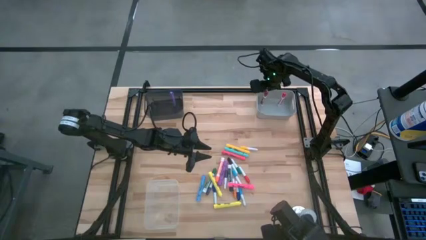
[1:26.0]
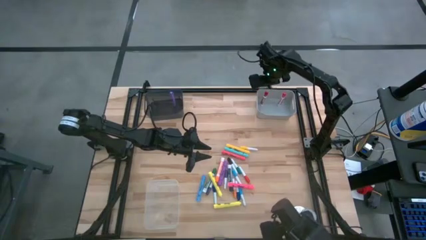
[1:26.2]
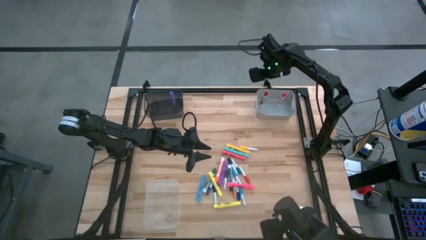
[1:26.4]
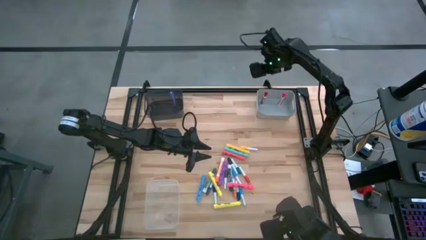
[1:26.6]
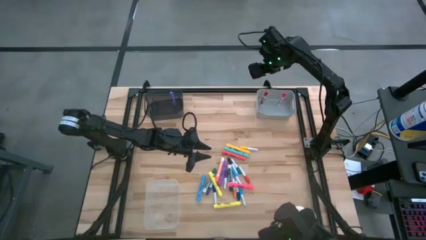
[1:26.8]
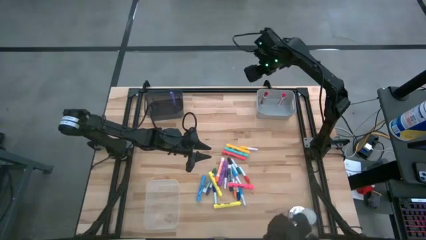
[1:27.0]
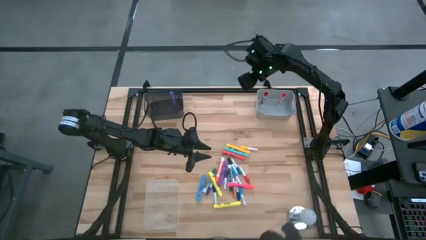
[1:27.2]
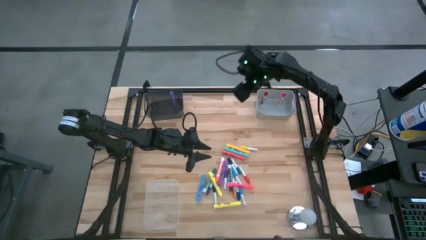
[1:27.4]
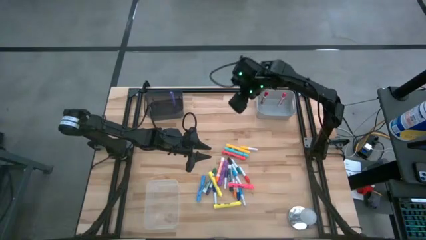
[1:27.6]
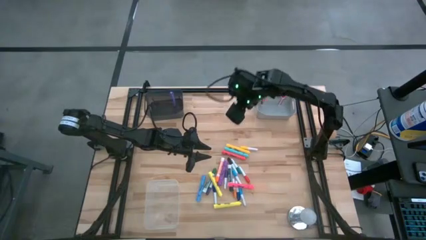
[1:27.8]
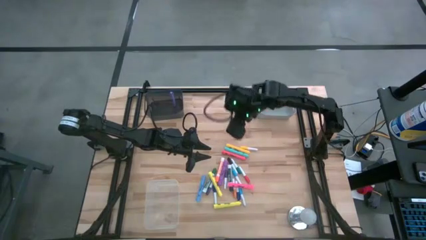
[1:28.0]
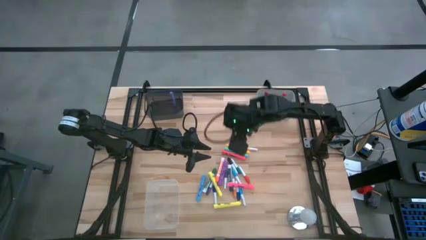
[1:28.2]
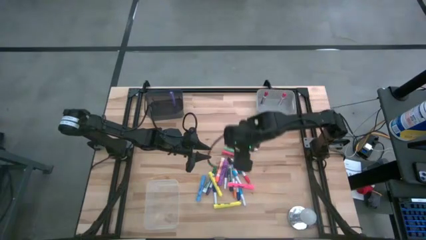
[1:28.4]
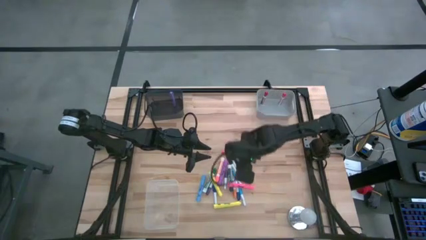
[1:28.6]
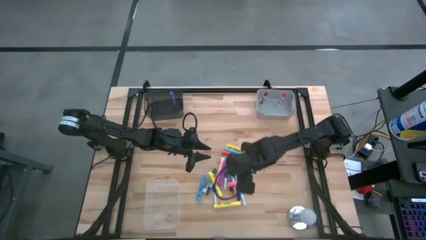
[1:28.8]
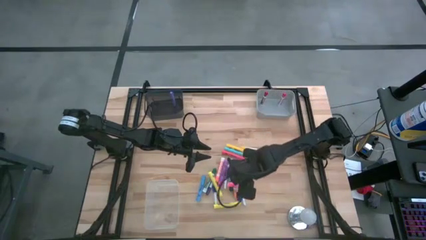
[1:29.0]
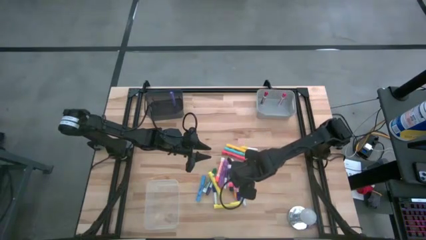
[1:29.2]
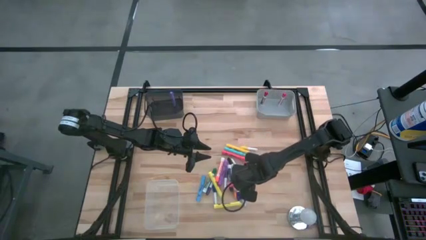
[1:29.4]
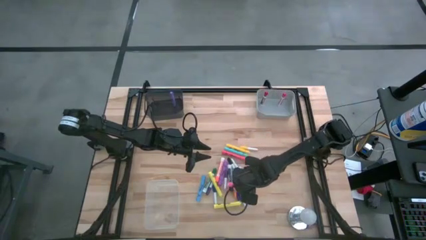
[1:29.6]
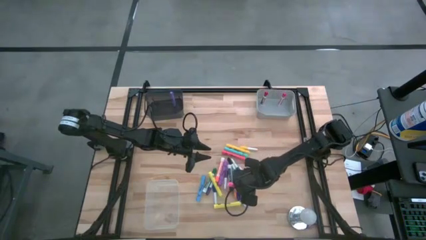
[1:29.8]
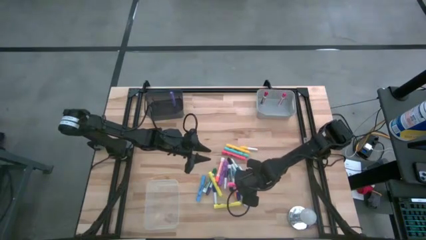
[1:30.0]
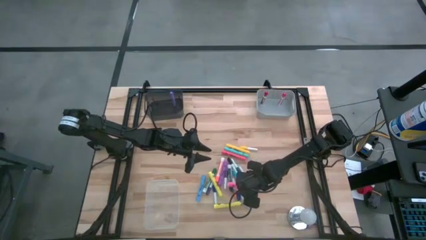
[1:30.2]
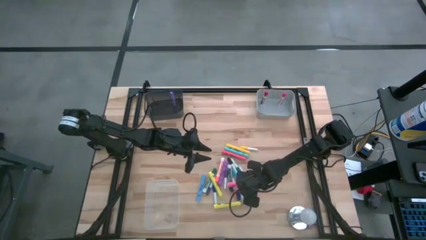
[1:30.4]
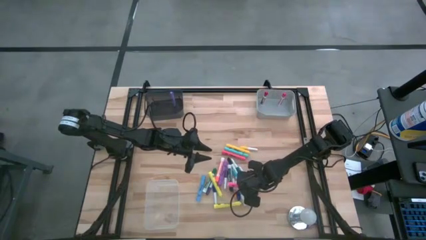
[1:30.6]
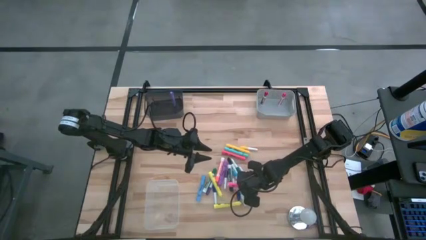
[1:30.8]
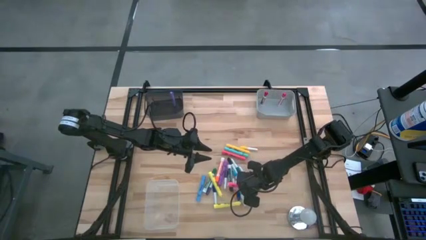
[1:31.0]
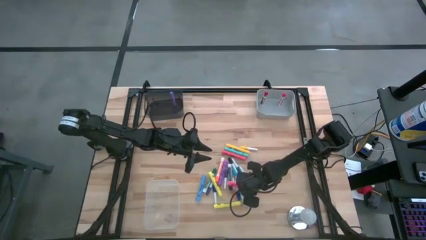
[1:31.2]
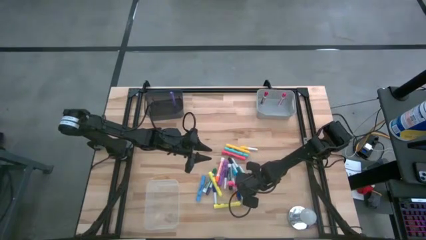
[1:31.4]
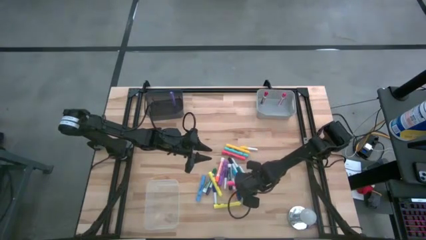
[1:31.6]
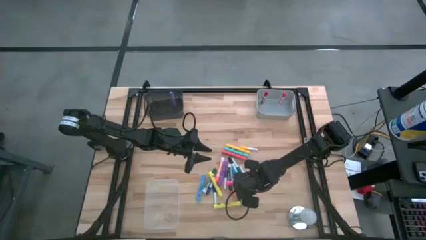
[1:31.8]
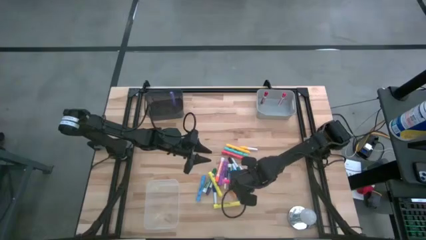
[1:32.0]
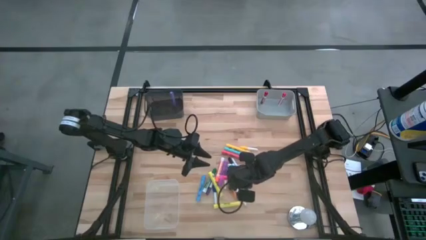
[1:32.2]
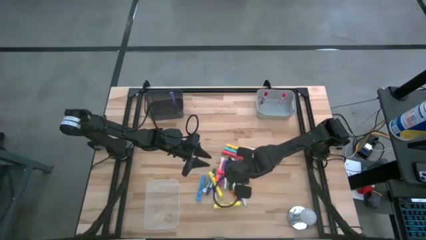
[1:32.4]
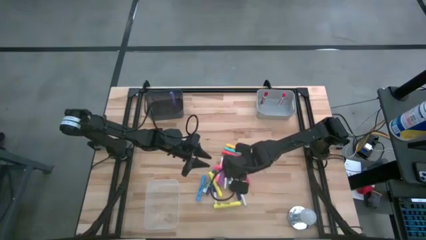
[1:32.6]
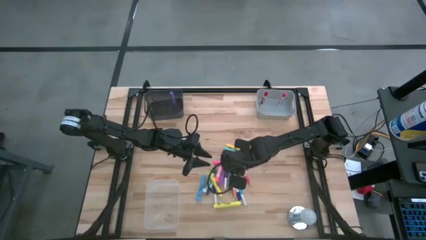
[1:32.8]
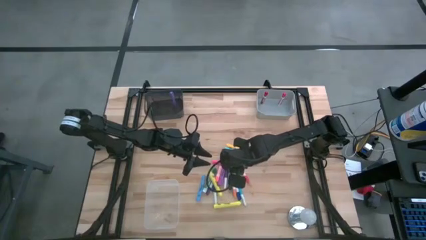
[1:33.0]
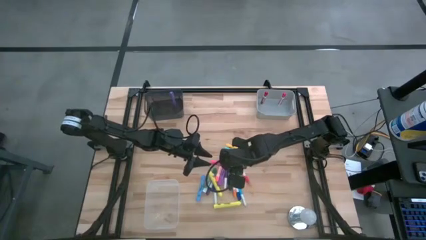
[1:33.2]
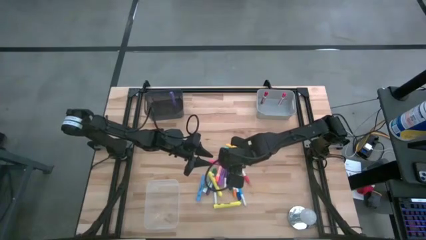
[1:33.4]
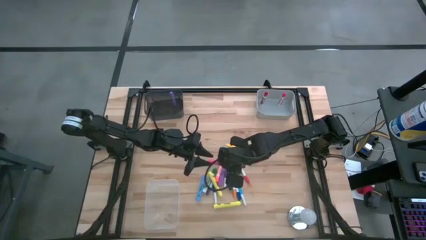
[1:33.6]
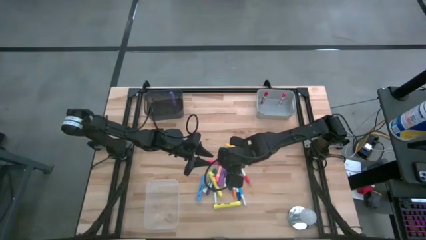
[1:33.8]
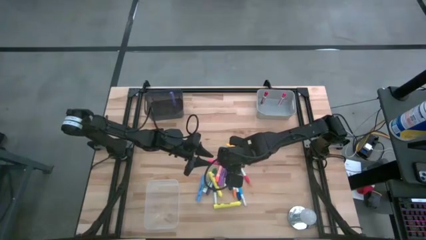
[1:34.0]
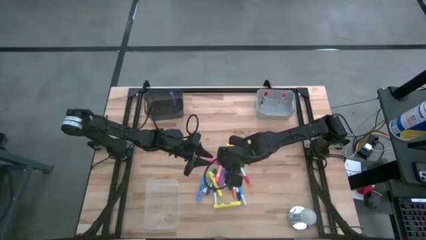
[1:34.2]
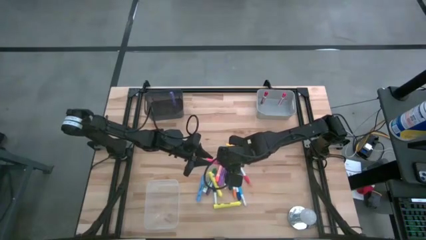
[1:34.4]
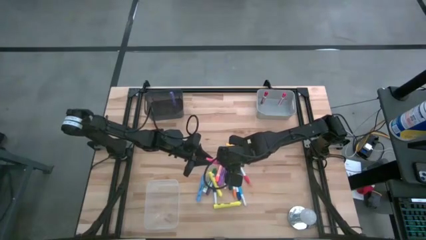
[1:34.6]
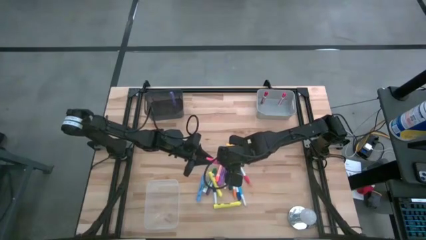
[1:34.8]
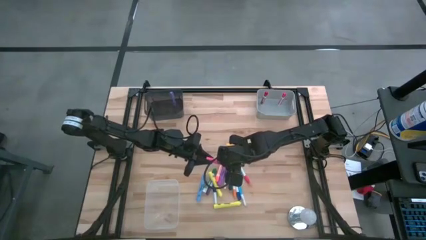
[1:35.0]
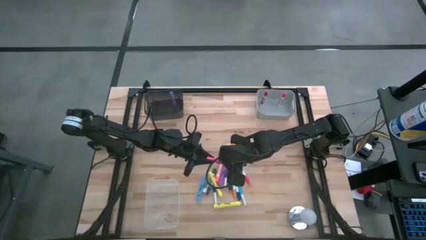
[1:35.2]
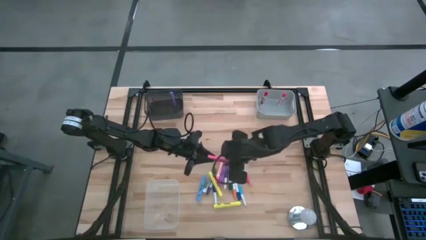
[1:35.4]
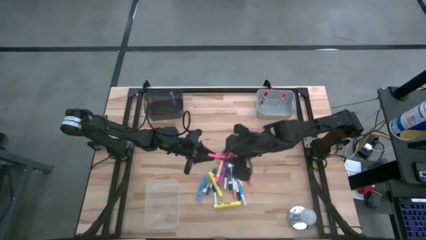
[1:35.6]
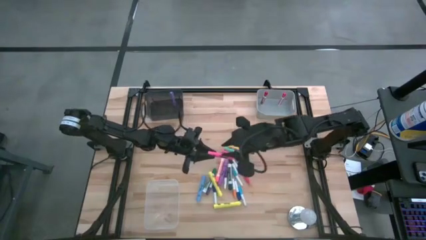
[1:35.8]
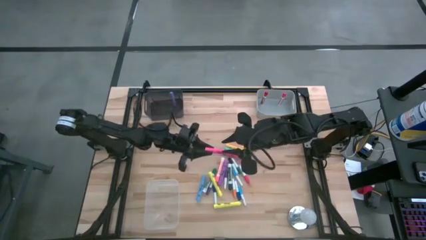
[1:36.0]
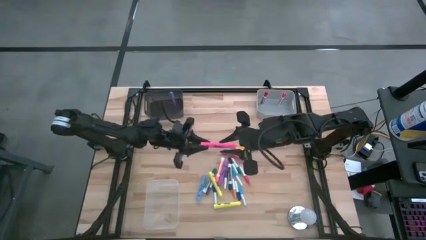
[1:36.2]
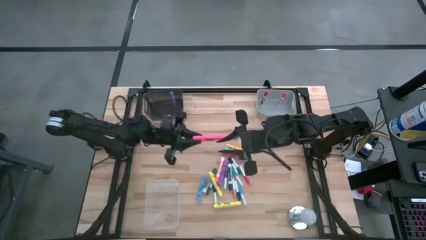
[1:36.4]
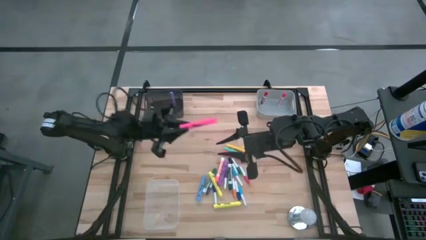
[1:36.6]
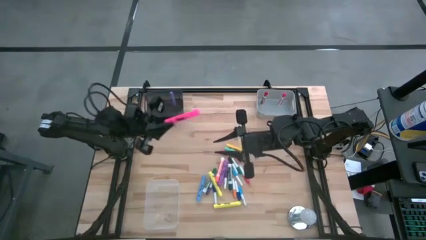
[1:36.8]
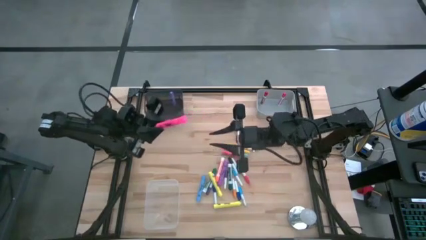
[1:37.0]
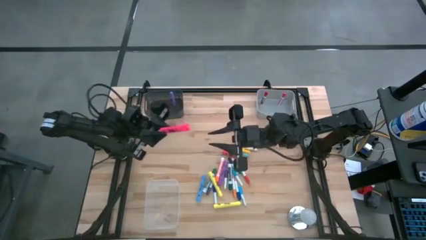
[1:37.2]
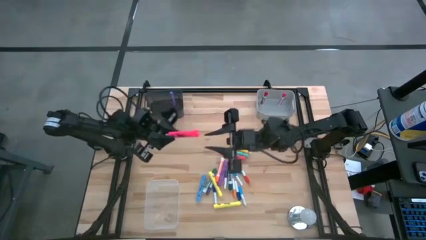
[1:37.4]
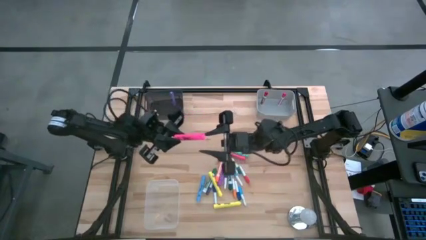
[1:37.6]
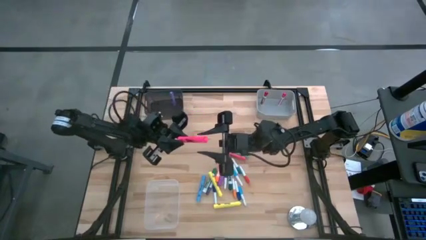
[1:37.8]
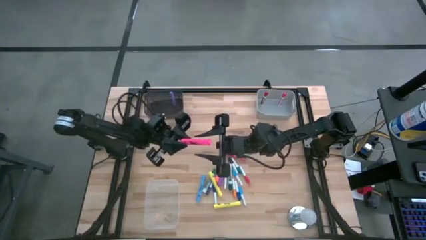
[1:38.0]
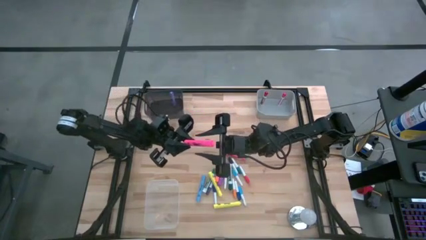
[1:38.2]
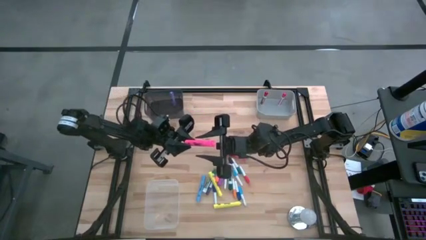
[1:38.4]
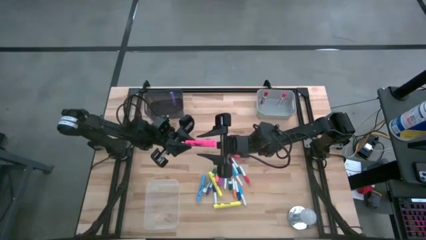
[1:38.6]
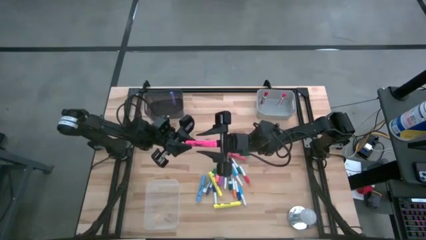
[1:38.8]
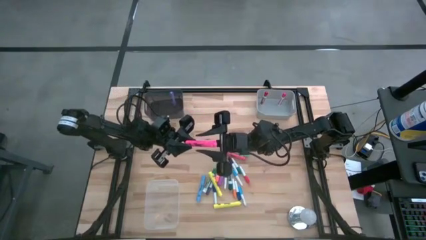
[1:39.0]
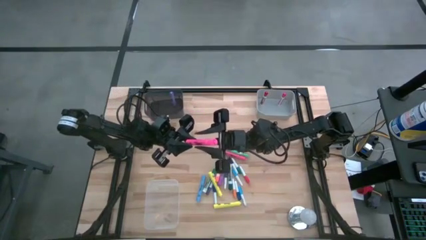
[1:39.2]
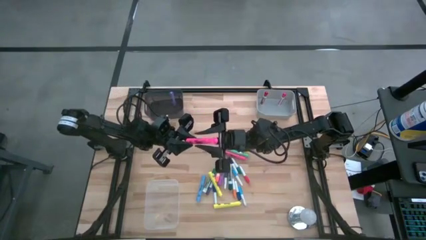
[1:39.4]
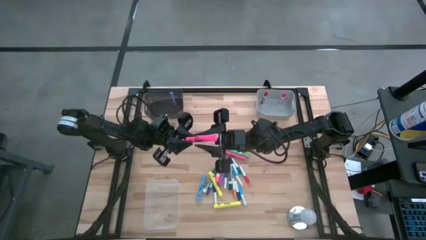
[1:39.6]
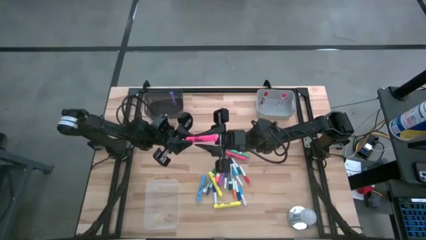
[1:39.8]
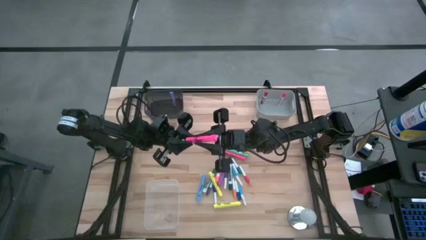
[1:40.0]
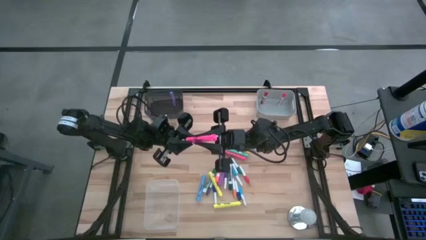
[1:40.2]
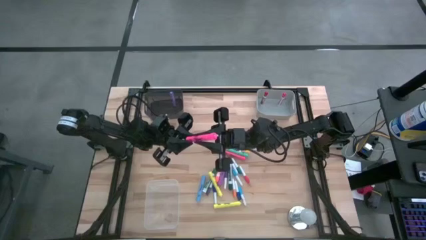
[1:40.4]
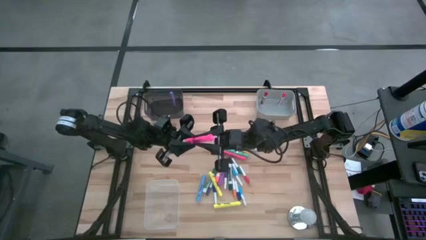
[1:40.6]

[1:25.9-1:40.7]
Task: Pick & Place Markers
Put the pink highlighter pen into the black bin

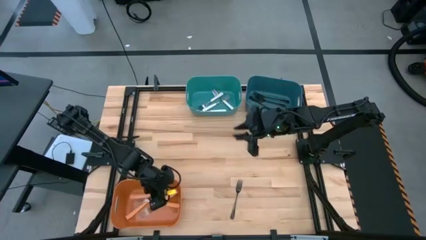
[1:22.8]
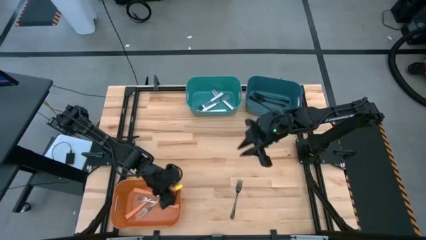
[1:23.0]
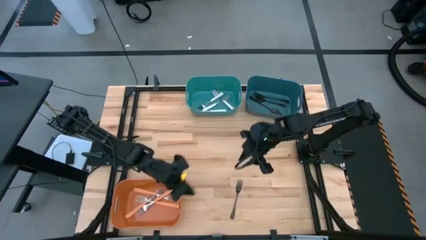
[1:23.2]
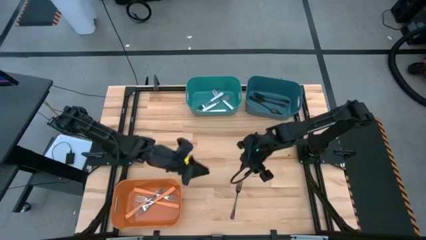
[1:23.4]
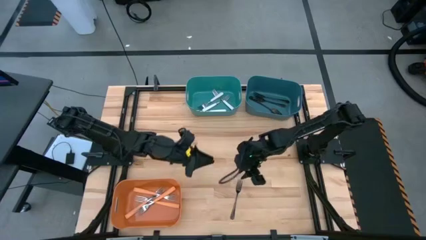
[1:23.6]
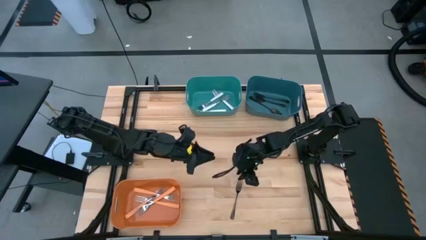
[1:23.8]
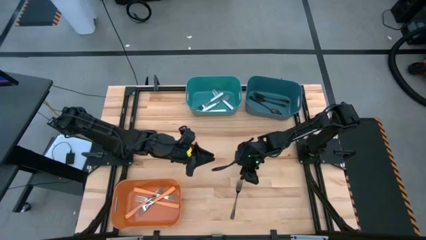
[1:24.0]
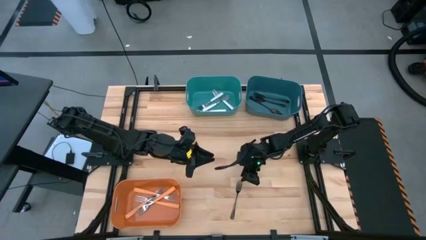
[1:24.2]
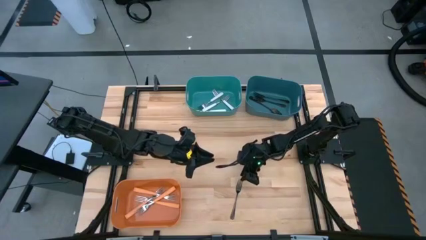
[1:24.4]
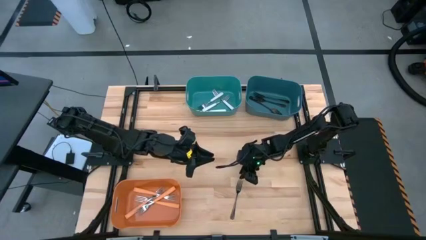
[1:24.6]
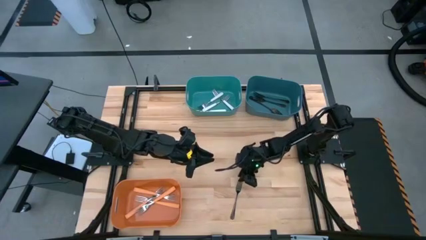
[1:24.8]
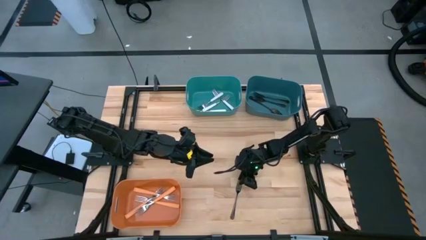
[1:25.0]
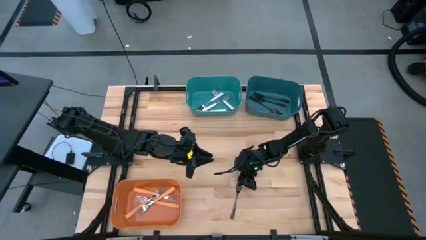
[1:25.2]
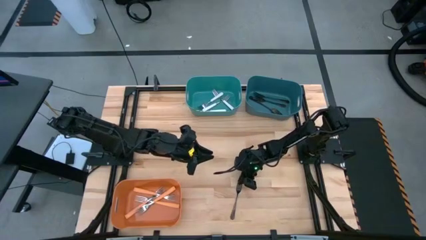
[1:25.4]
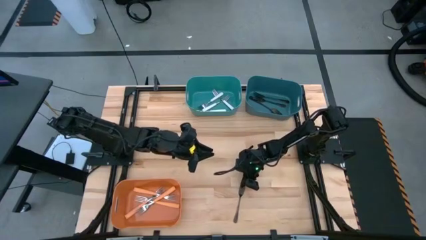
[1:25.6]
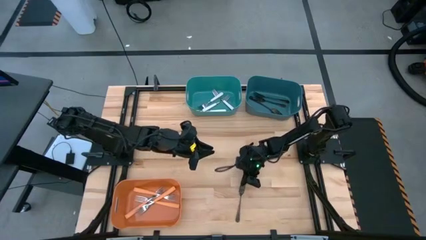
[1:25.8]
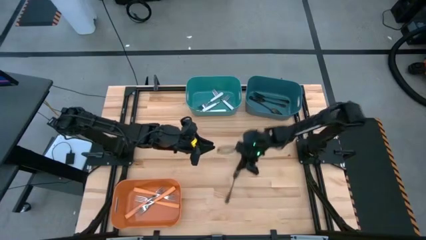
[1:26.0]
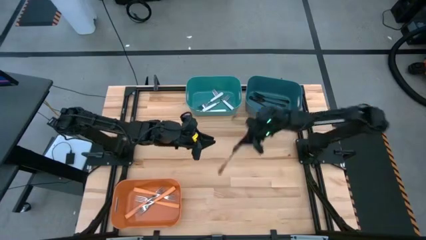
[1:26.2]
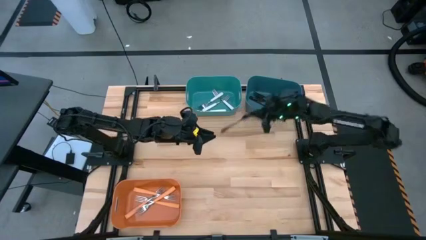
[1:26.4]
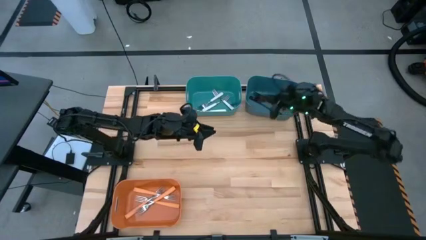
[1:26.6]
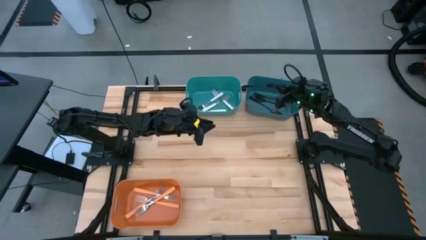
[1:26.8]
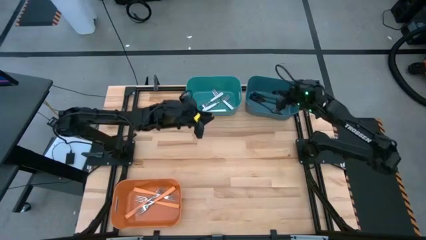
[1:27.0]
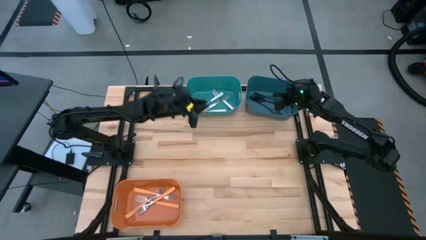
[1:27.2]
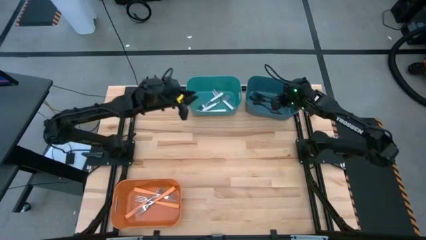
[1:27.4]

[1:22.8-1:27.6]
Task: Sort silverware by color (type)
Put the black fork into the blue bin
